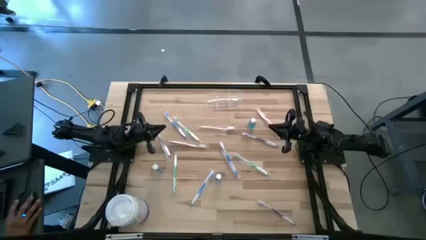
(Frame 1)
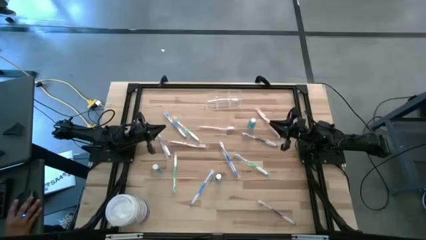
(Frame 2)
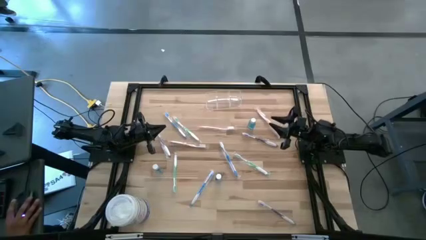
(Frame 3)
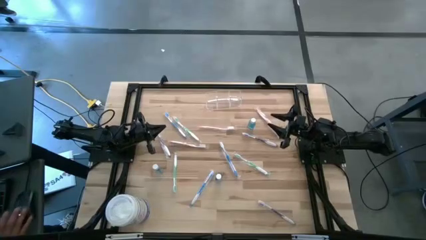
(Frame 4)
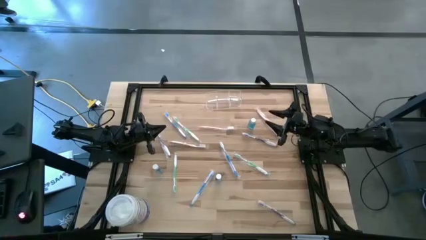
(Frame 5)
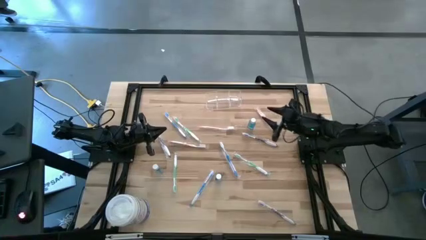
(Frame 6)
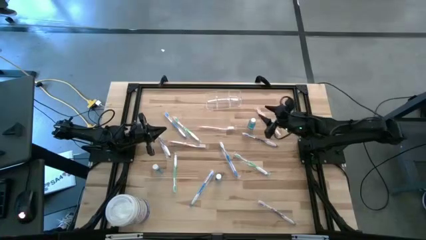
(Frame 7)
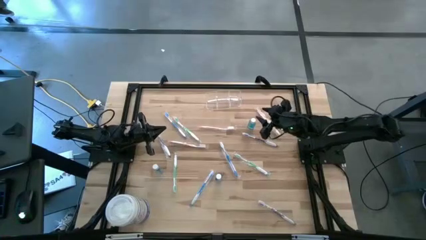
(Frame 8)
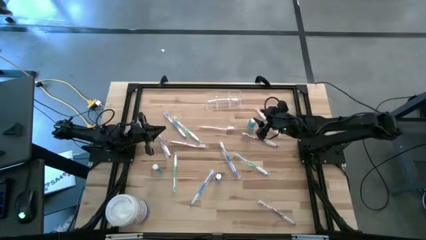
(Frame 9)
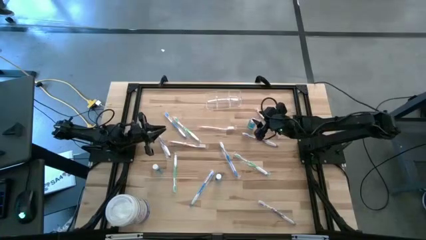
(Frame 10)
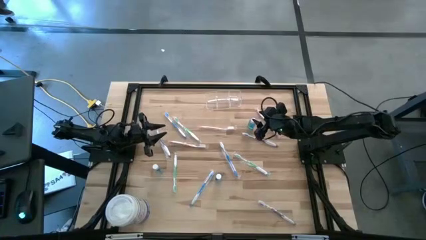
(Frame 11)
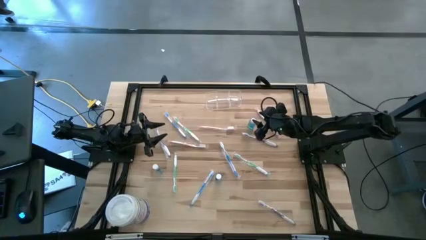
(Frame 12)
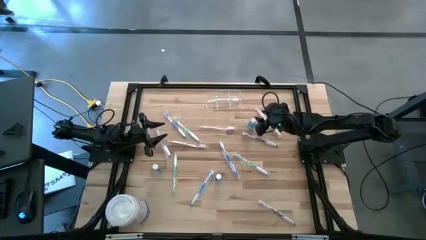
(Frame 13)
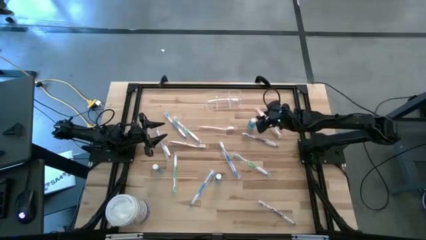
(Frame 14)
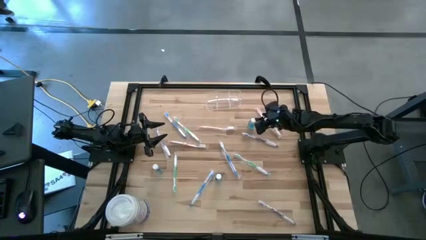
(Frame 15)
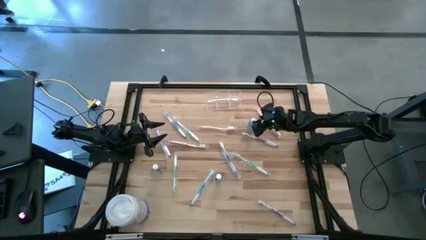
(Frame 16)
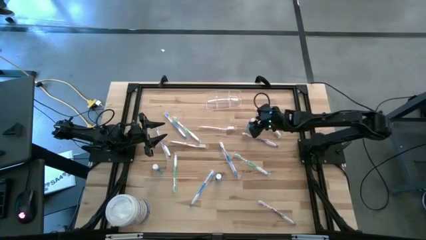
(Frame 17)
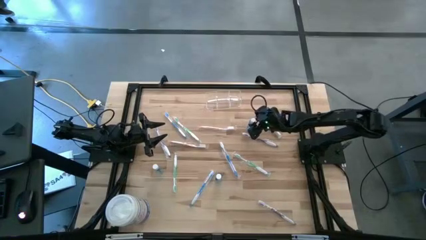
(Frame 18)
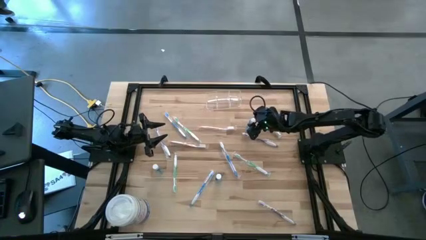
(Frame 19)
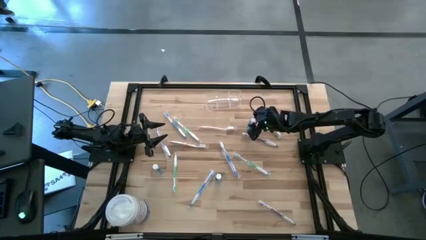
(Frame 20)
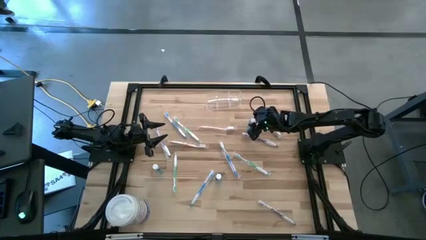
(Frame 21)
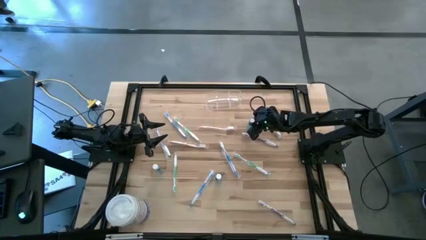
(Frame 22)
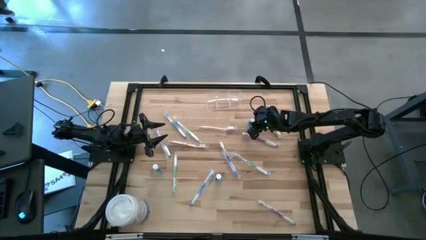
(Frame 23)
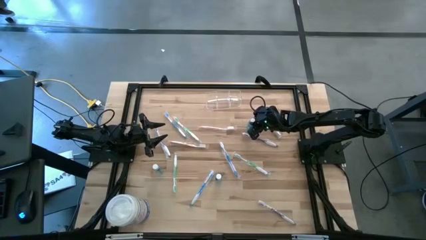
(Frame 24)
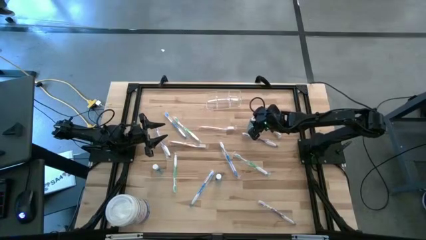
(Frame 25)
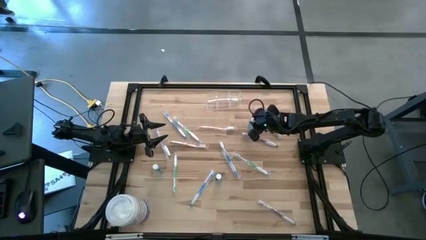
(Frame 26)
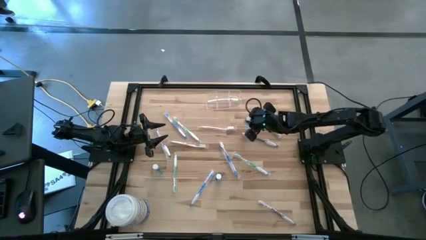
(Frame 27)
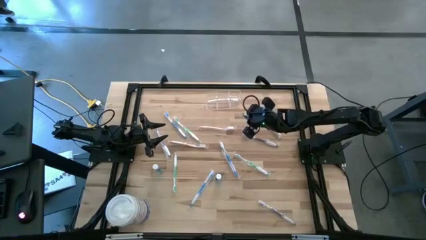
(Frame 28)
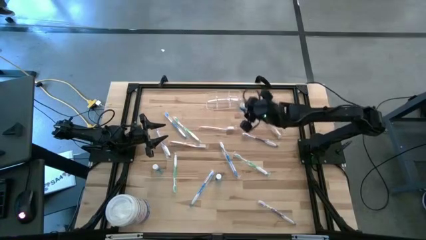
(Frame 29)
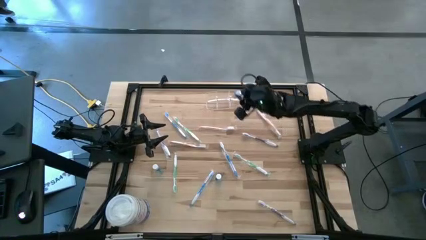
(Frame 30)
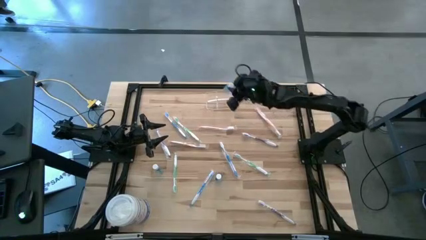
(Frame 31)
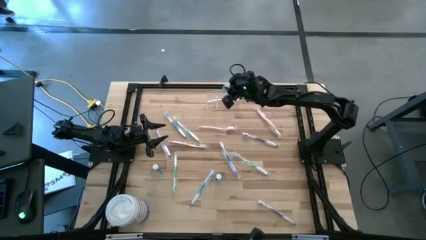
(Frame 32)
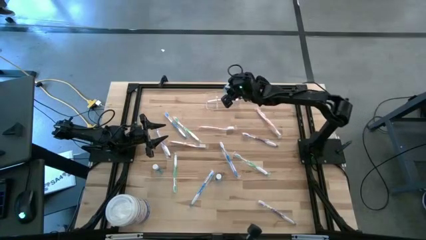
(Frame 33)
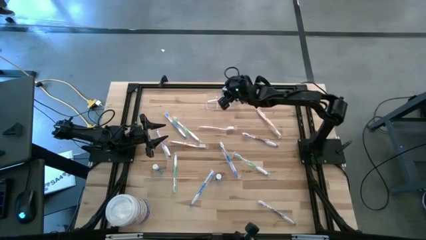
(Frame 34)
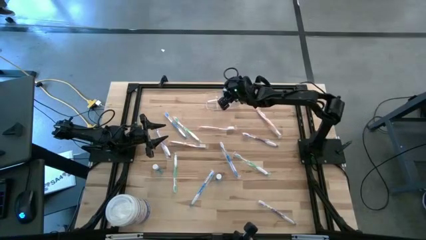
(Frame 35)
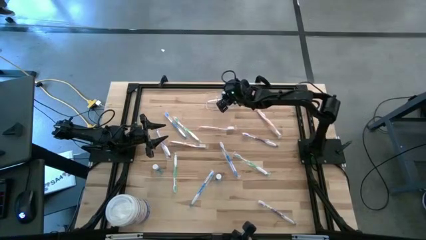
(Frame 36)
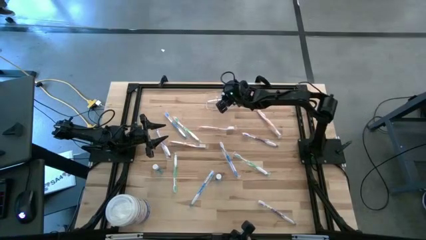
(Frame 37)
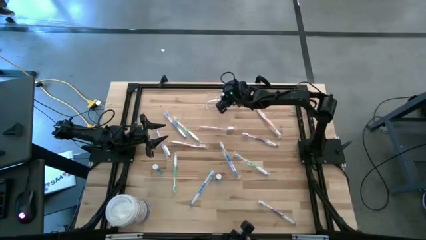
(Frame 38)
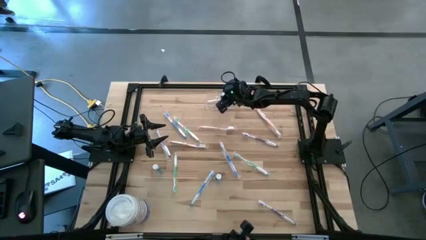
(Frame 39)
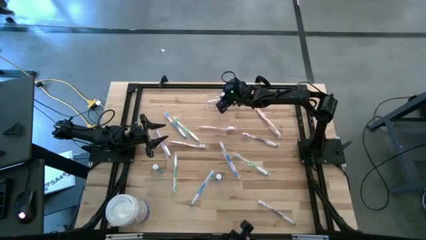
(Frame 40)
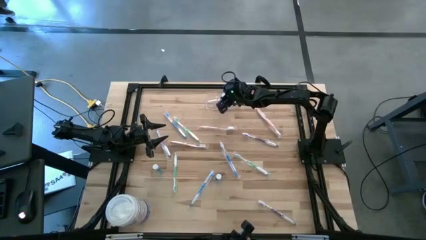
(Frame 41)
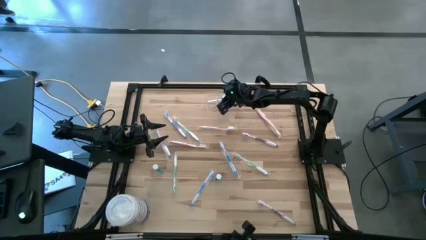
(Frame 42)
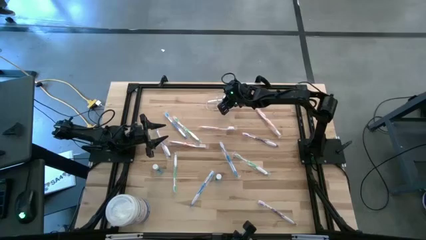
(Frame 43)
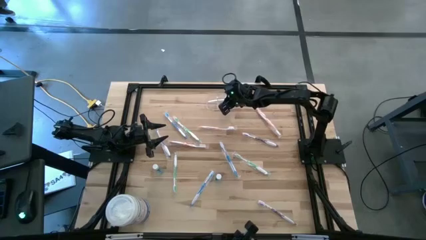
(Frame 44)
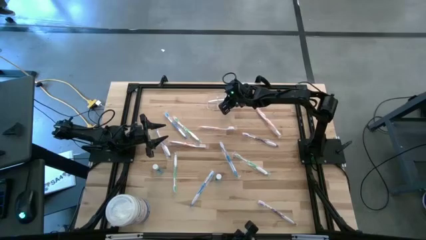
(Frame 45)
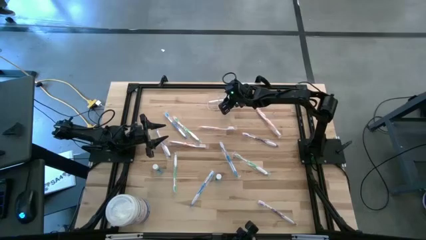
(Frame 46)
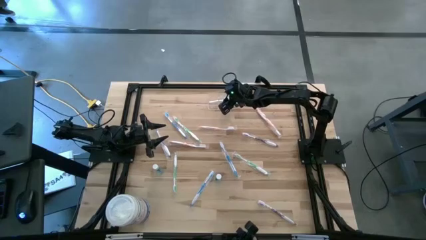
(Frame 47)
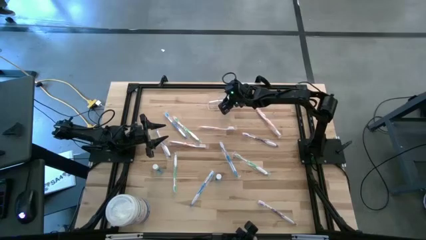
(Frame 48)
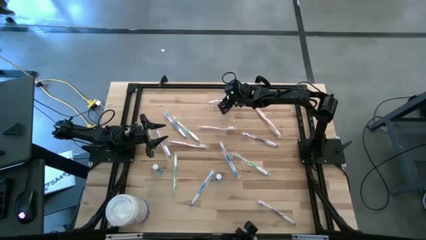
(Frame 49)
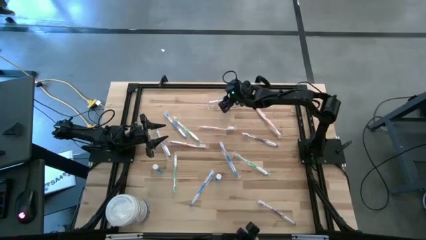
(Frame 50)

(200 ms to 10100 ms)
Task: Pick & Place toothbrushing station
Put the top blue mouthwash into the transparent organizer
